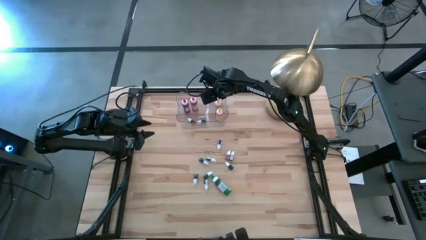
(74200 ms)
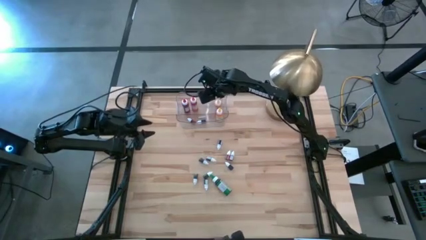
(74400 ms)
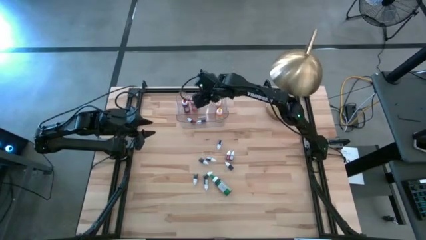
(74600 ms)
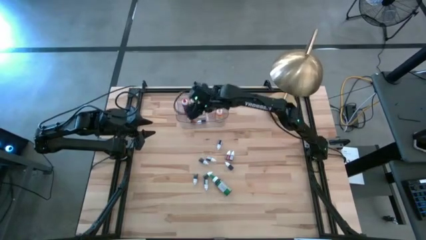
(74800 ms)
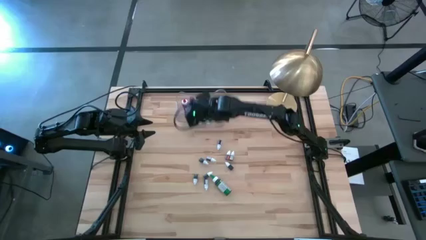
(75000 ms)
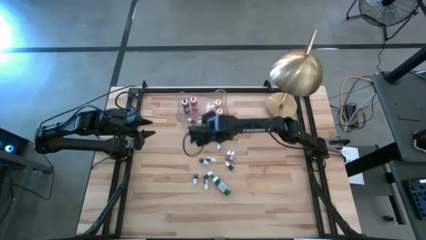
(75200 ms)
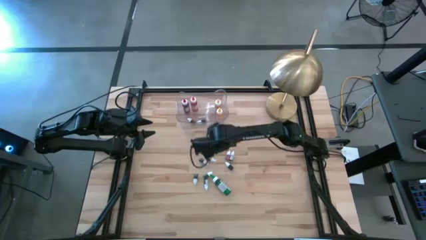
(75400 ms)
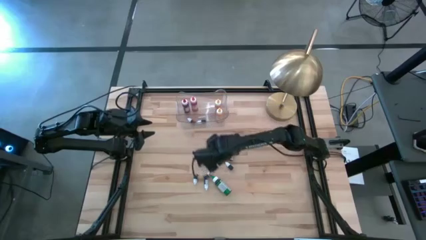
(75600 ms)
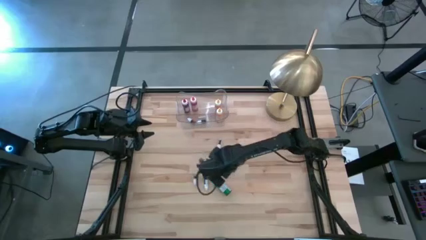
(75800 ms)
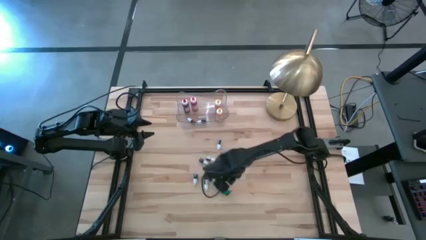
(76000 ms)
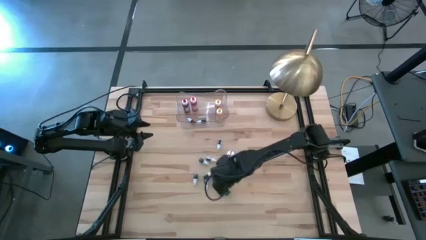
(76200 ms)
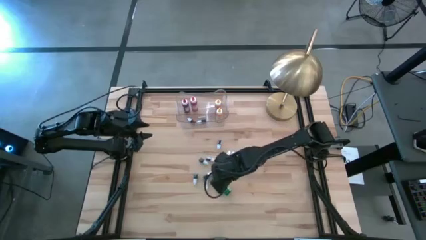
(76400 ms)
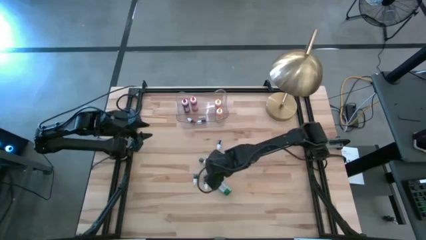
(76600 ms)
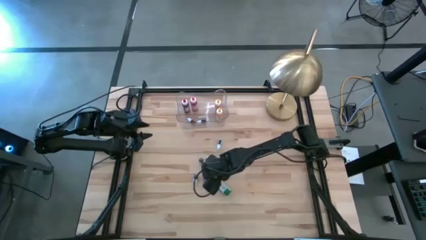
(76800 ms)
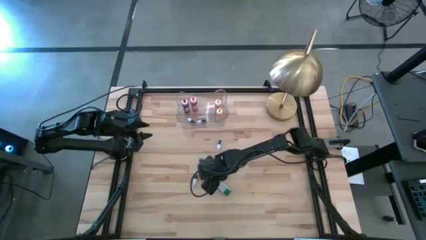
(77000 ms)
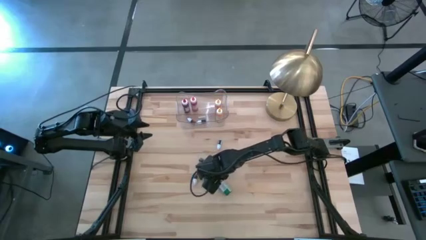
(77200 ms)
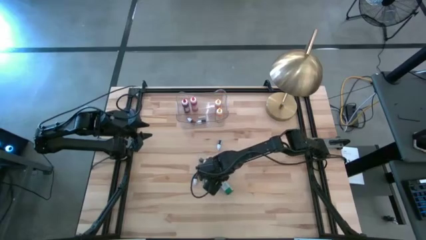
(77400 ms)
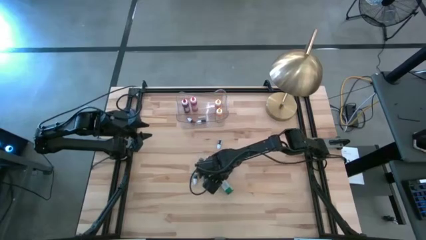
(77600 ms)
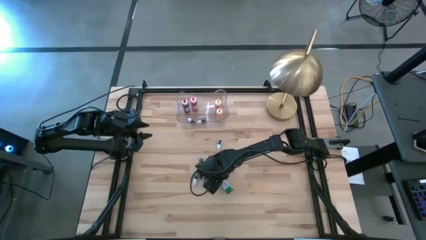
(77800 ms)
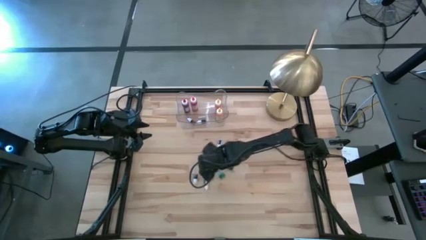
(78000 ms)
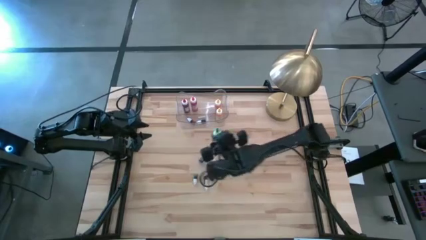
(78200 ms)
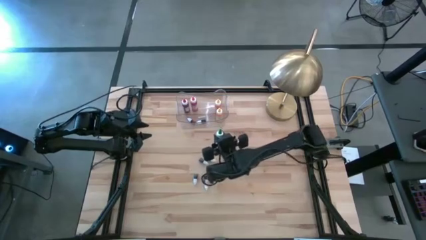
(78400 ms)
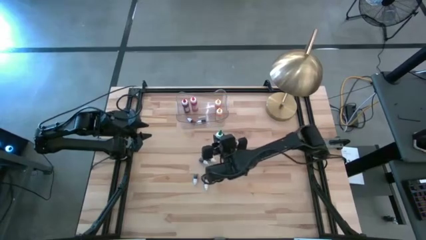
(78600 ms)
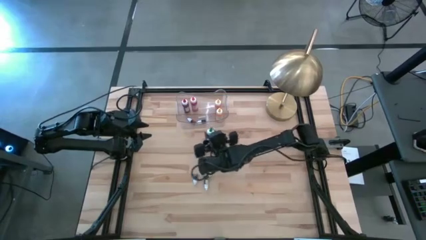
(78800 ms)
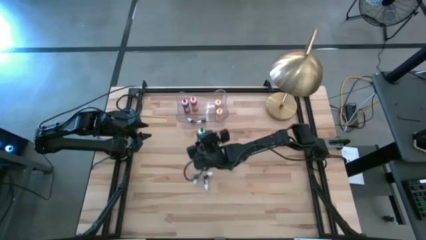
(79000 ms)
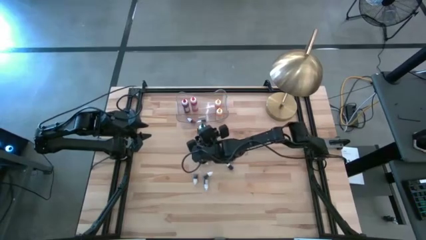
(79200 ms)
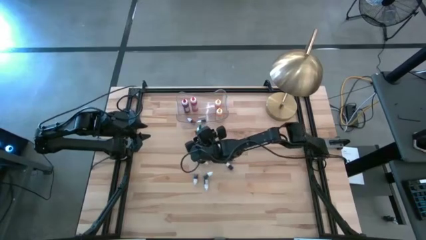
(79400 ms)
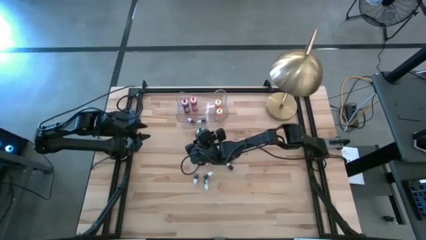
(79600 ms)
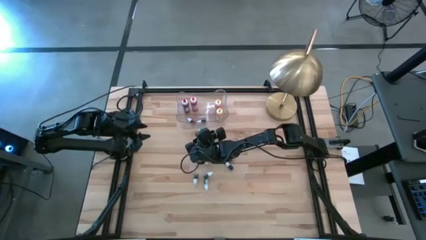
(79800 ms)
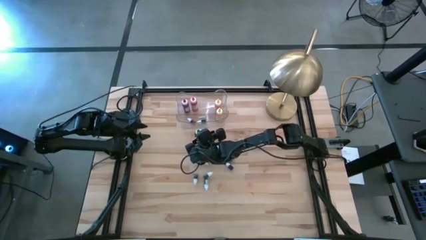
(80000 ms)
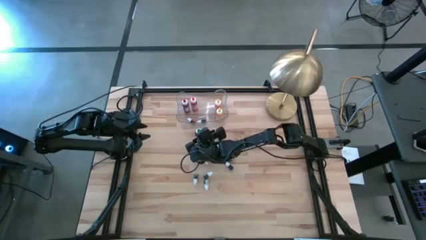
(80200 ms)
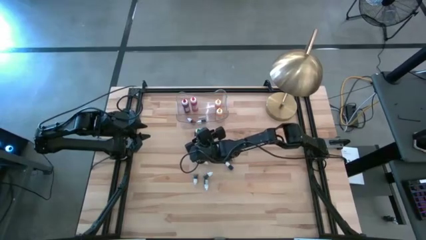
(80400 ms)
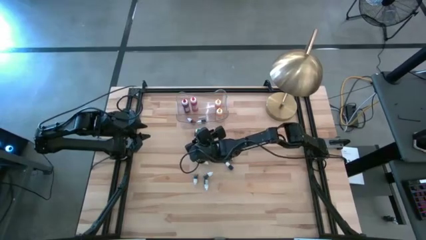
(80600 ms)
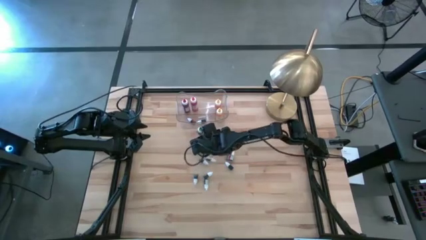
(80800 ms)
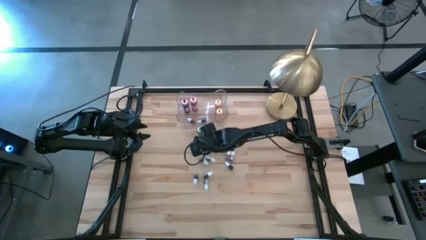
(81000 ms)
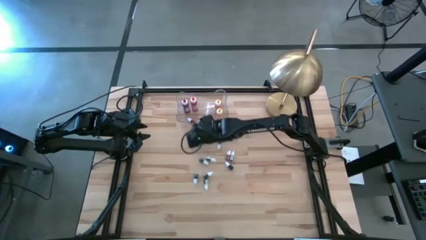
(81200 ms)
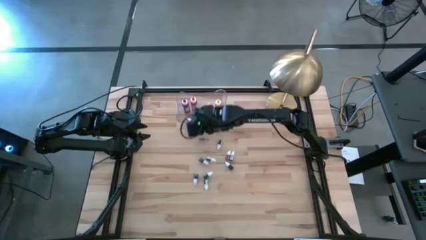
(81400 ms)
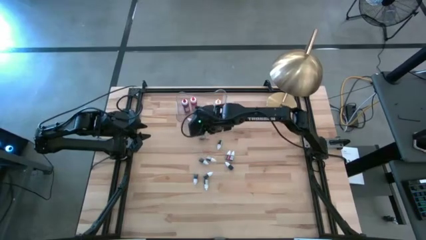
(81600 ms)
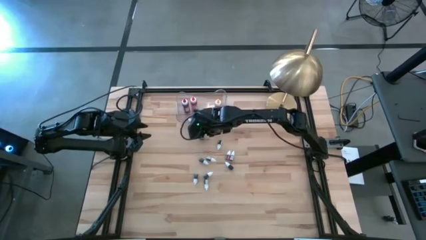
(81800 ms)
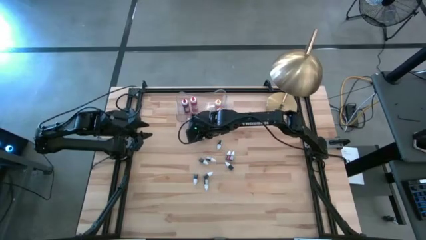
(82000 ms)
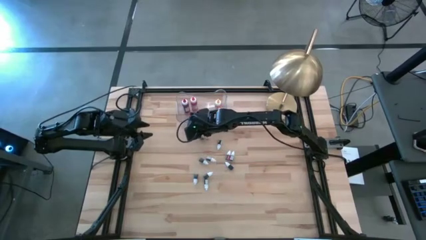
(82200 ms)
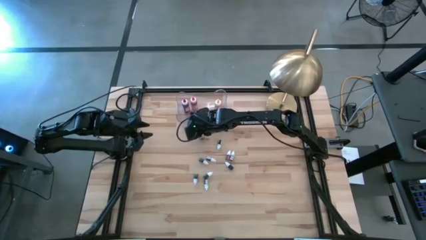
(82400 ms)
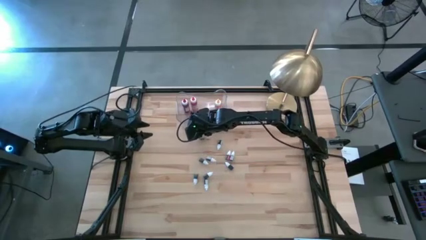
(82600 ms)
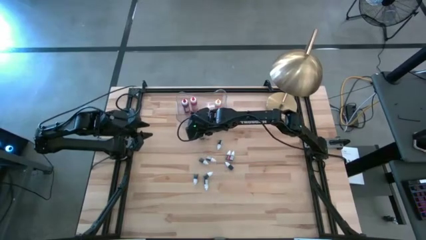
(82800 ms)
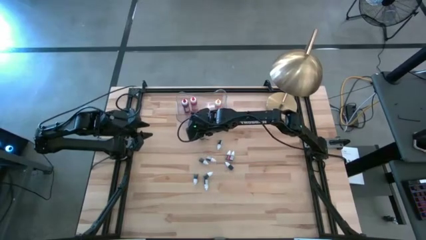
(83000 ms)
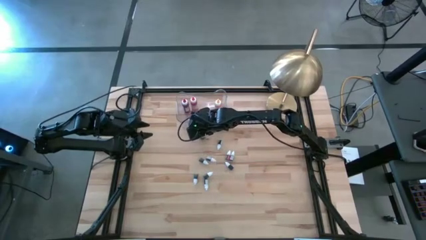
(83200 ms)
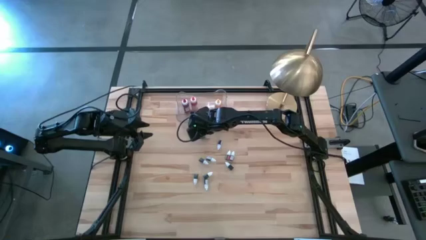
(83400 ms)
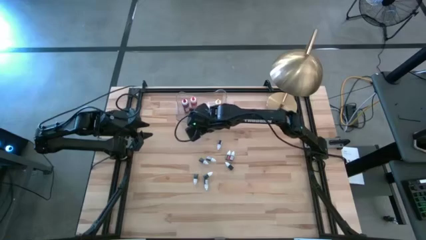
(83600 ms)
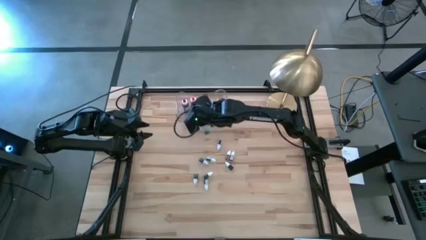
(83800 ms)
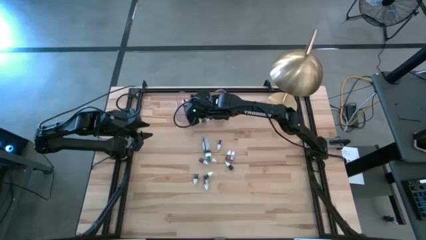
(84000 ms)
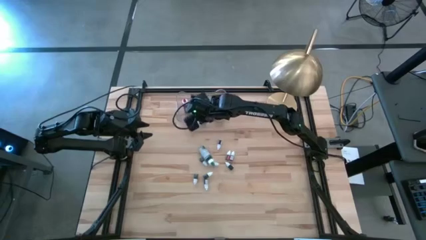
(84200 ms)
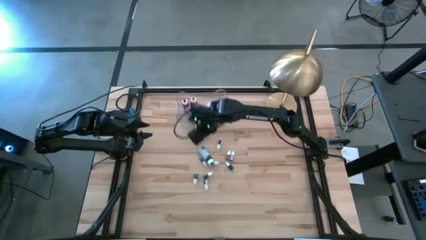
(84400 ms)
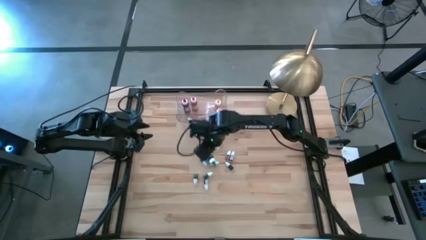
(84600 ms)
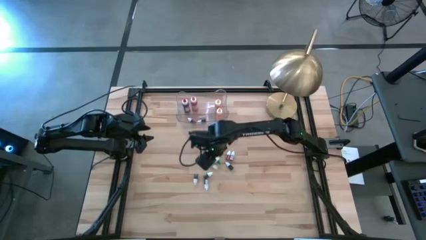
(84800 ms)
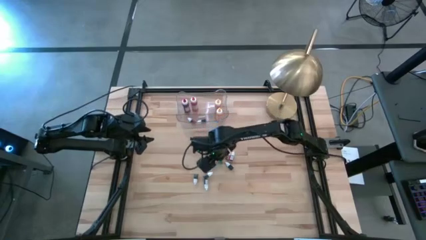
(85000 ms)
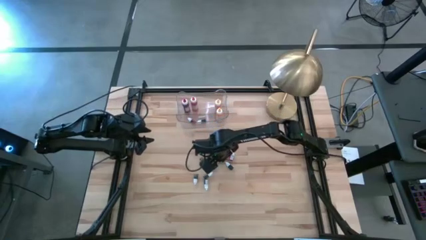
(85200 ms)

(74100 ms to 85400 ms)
Task: Pick & Place food coloring
Put the large green food coloring bottle into the transparent bin
